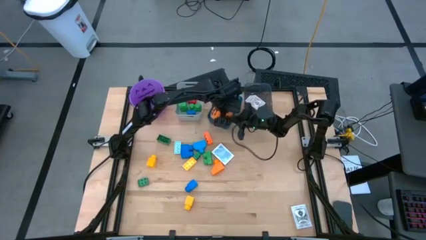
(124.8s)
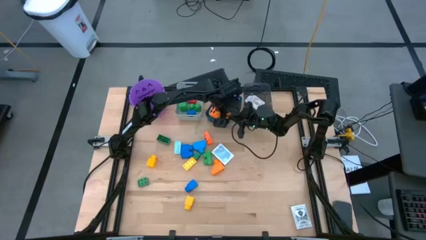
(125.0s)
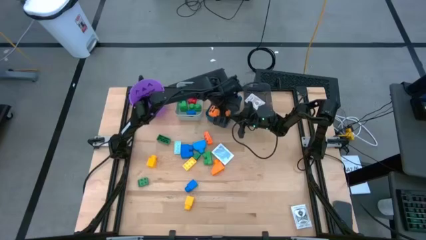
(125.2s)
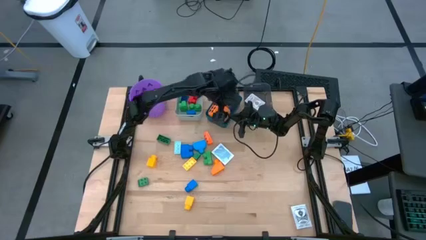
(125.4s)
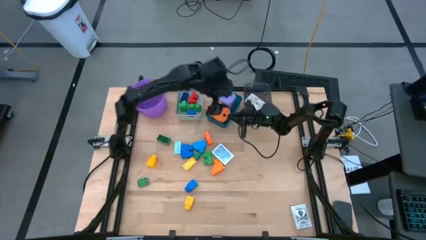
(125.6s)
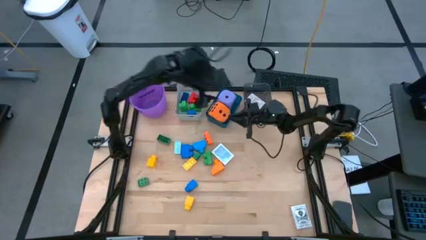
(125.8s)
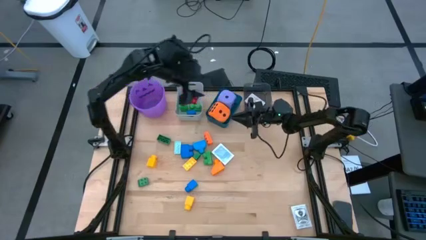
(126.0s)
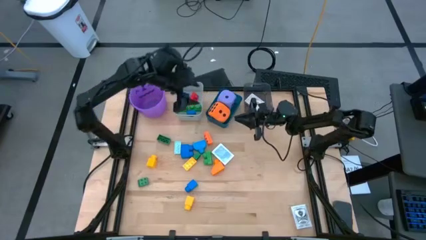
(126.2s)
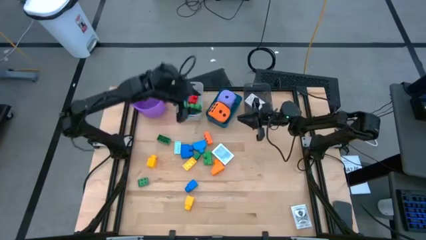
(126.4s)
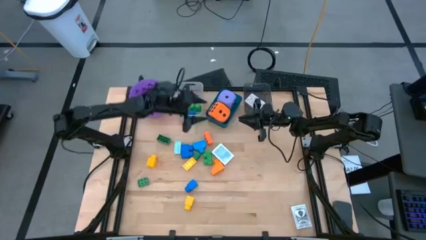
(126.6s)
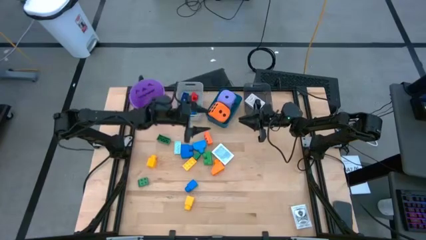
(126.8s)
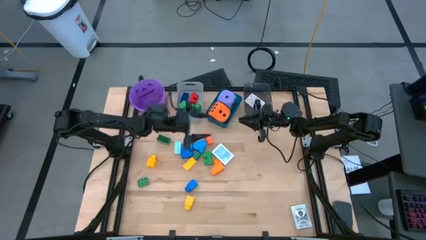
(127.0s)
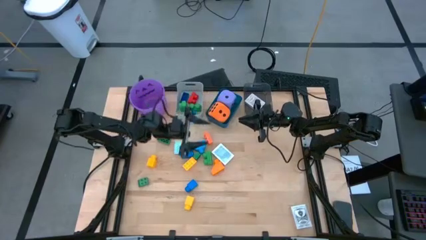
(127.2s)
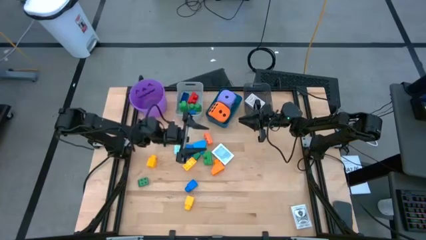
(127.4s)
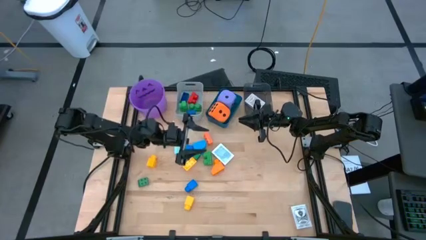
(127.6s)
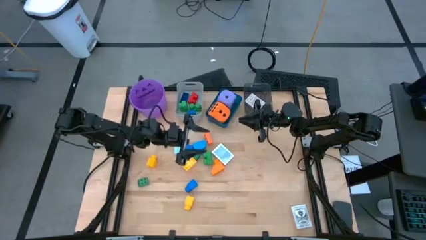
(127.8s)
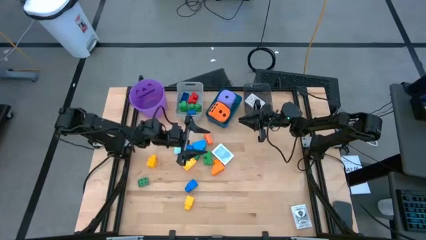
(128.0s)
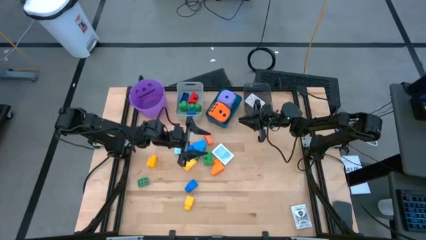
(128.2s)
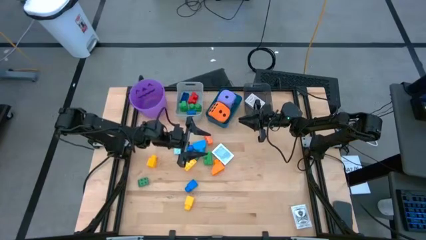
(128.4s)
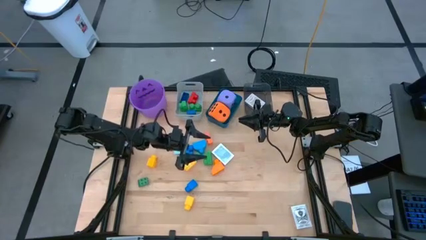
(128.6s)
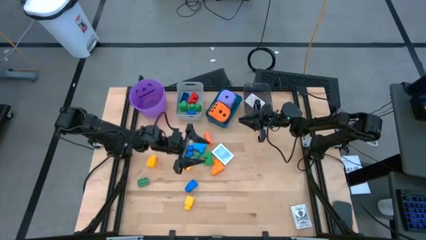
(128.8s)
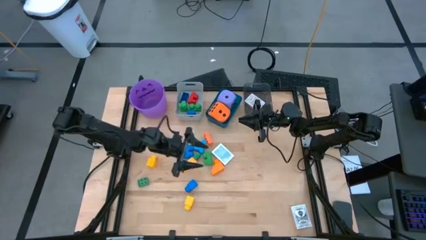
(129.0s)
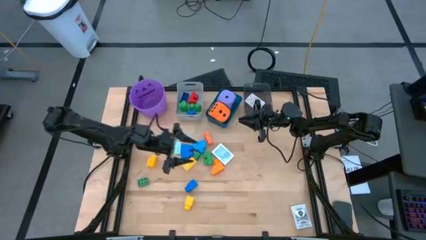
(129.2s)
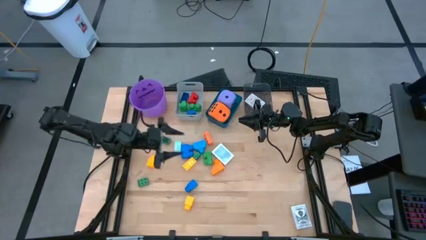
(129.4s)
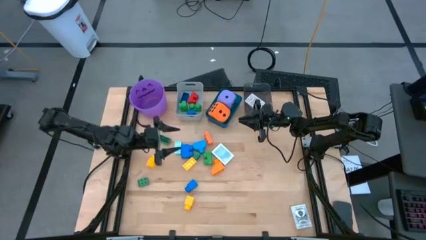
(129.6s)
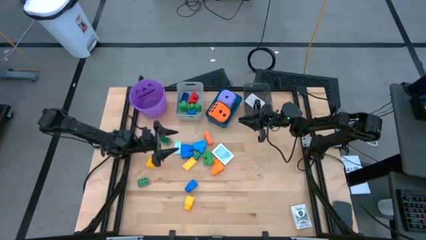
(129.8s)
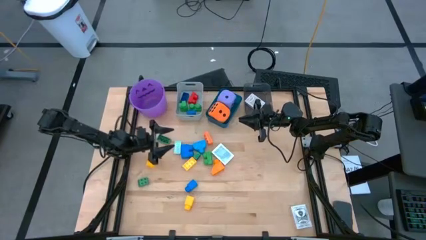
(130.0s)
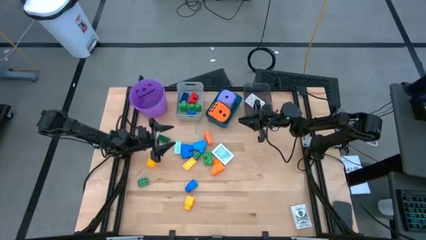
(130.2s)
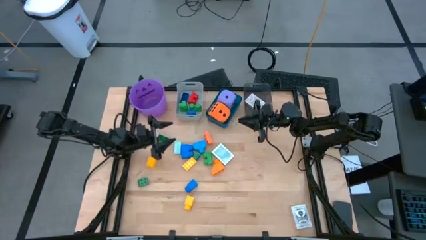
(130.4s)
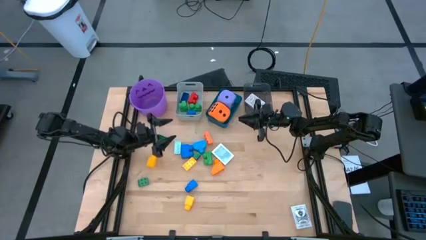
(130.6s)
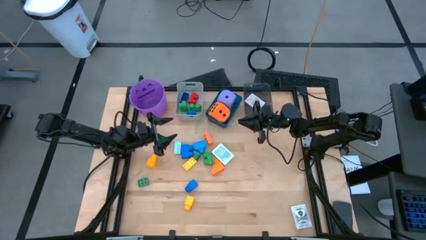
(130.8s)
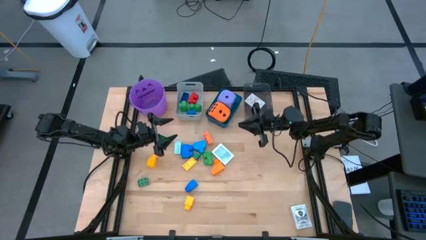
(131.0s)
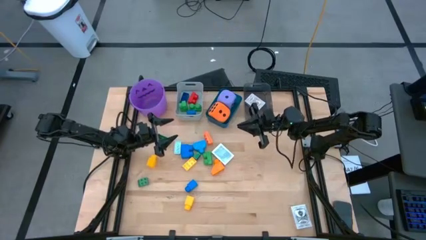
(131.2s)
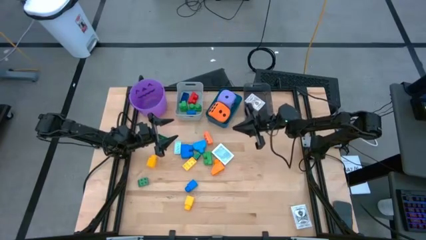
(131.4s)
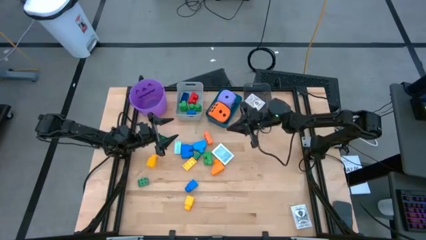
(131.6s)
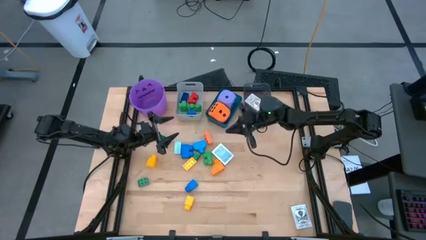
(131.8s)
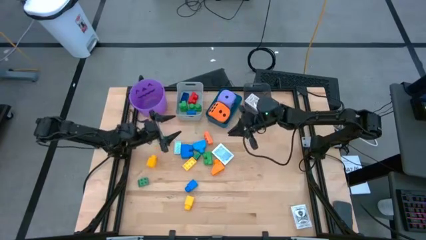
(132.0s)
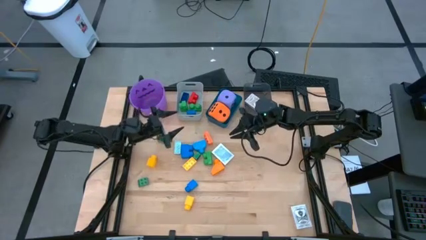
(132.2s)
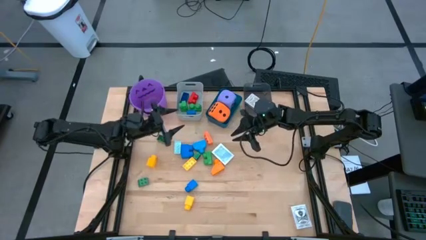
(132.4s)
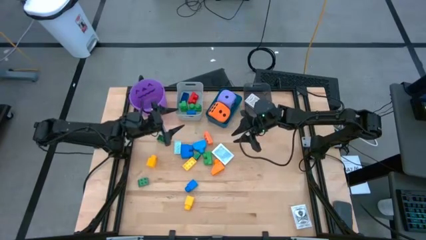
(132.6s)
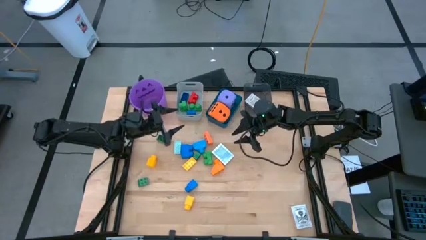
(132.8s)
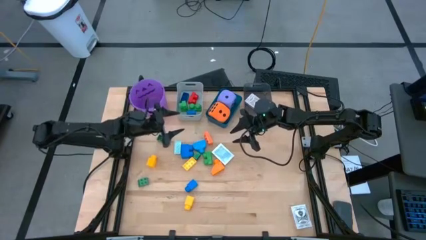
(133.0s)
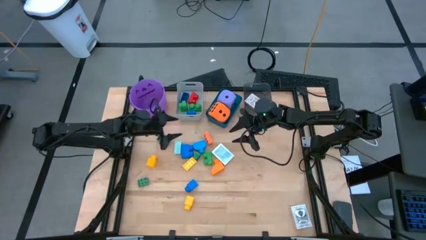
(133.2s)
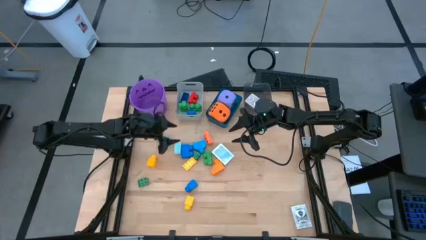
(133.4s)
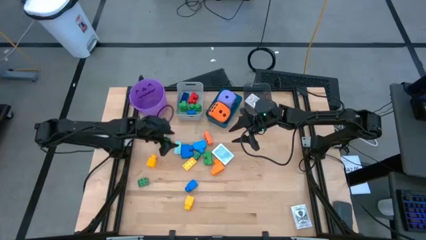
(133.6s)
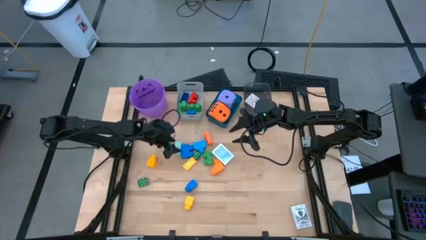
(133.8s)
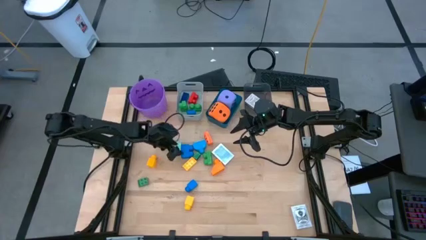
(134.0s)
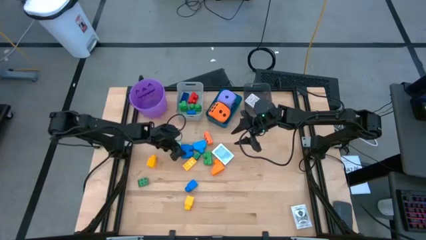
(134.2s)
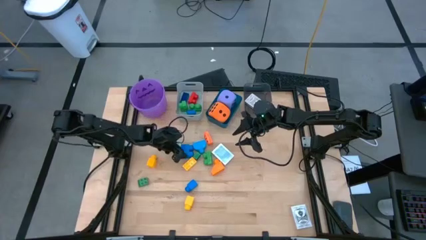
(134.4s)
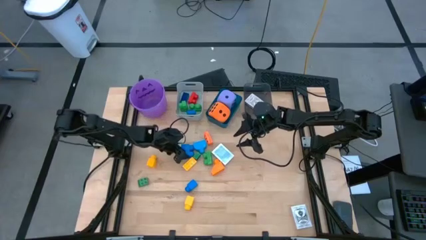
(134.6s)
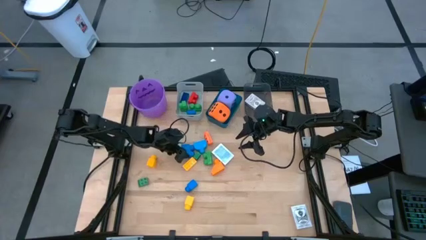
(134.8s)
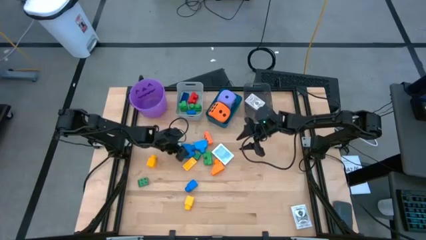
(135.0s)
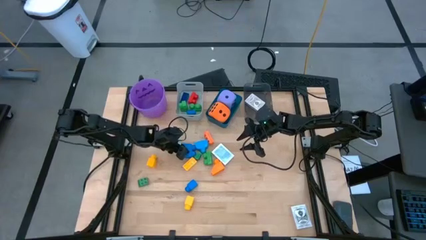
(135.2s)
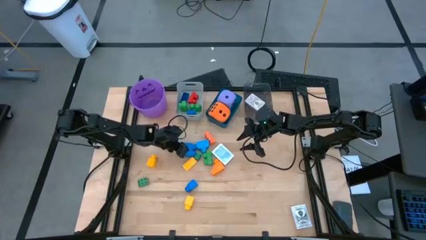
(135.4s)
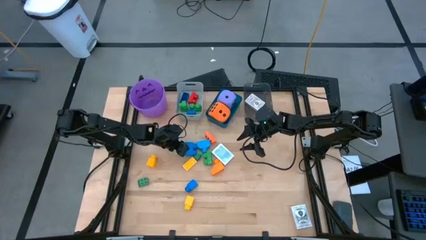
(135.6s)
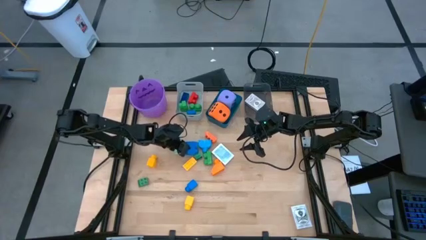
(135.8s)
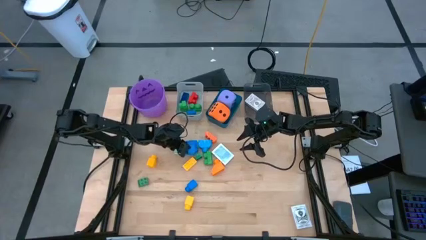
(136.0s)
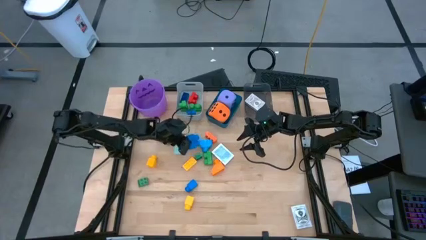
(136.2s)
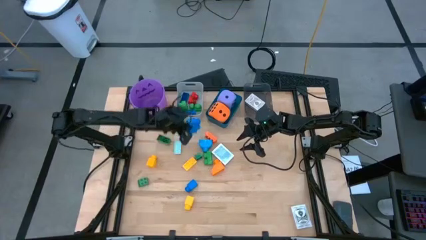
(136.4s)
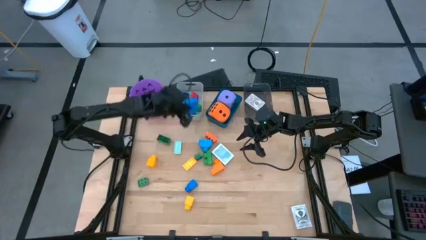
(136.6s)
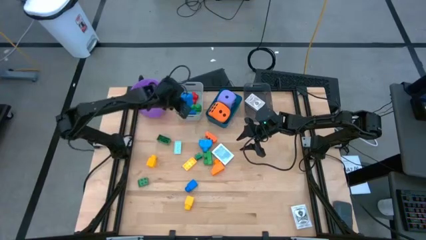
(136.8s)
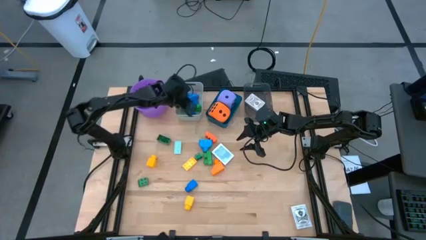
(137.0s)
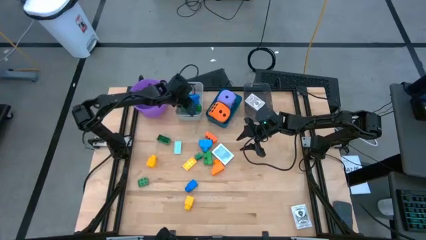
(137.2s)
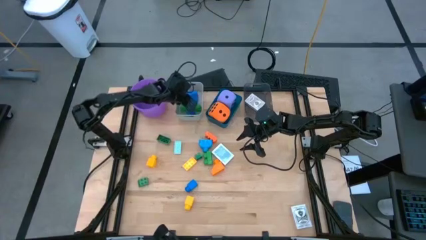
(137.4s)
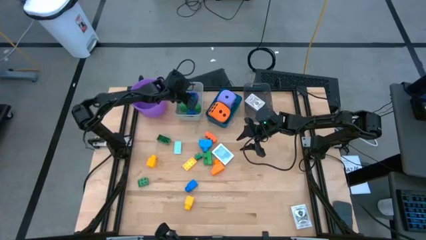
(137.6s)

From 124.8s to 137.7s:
Task: Pick & Place Toys
Put the blue game piece into the gray bin

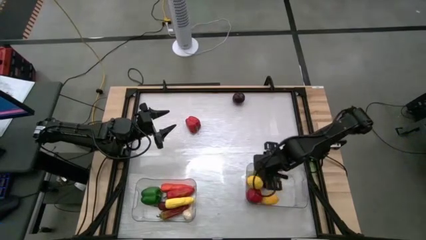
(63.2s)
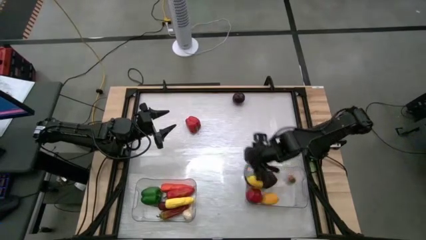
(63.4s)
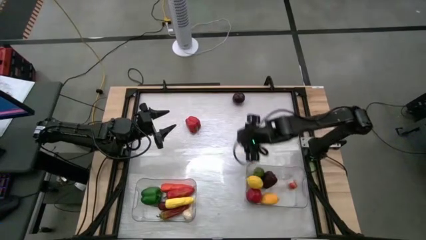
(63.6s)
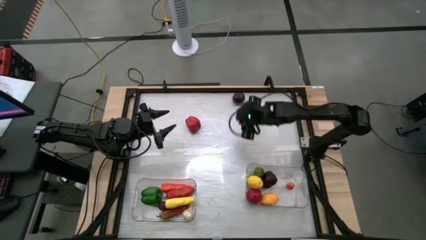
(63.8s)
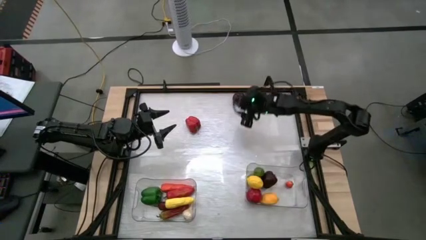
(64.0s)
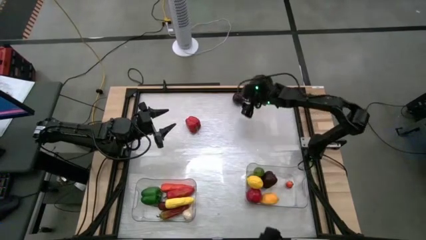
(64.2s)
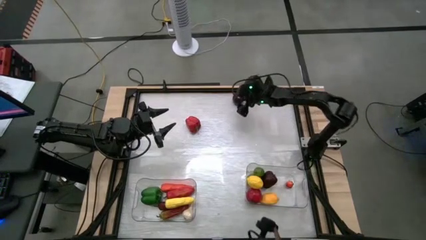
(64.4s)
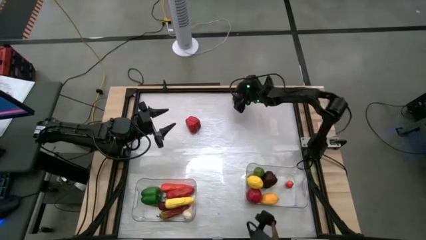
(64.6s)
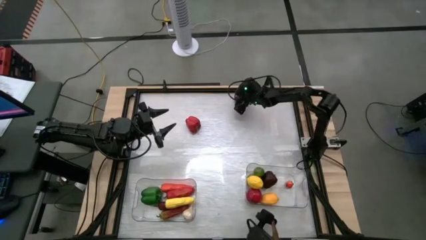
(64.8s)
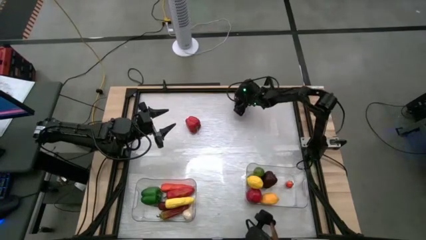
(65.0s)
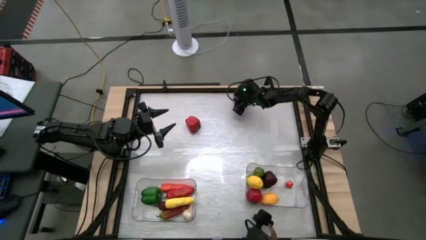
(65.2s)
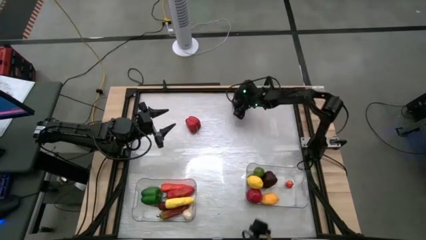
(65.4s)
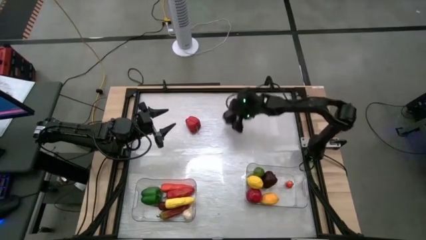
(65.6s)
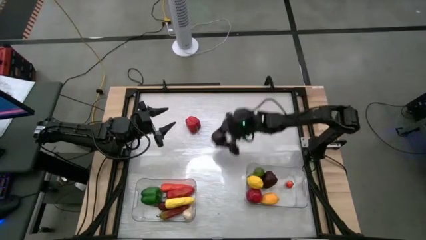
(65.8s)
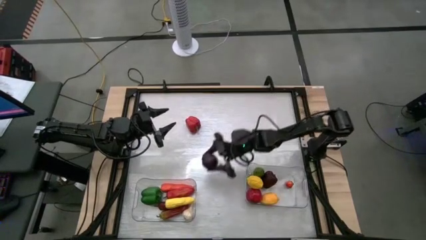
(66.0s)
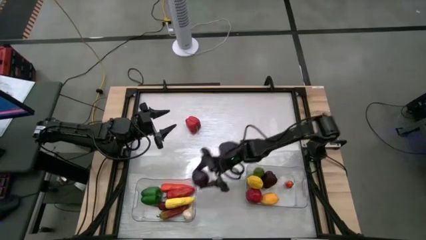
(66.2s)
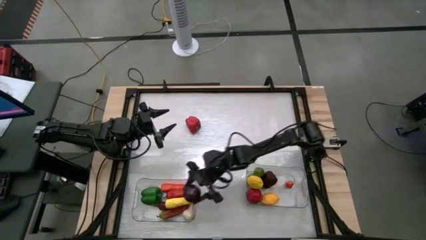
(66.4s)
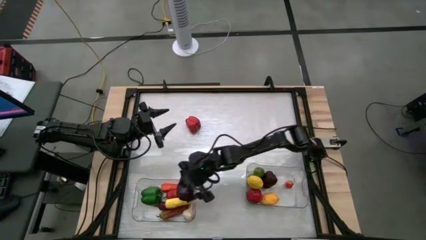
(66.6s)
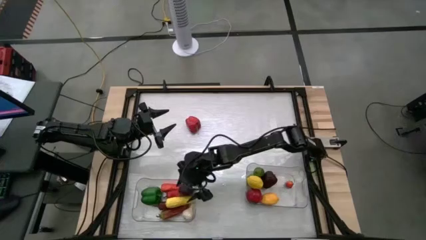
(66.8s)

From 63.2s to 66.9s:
Task: Sort produce into baskets
Put the onion into the left transparent bin
